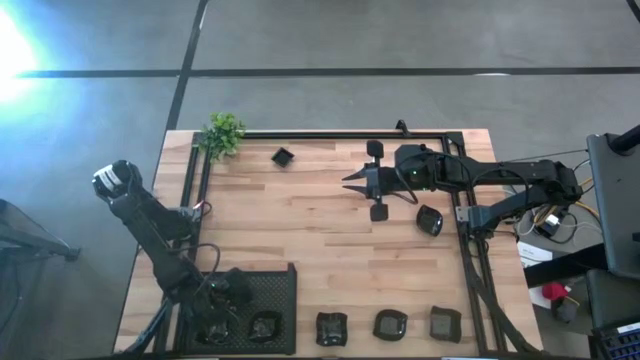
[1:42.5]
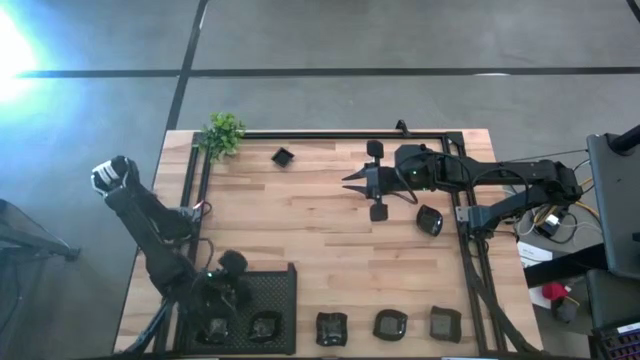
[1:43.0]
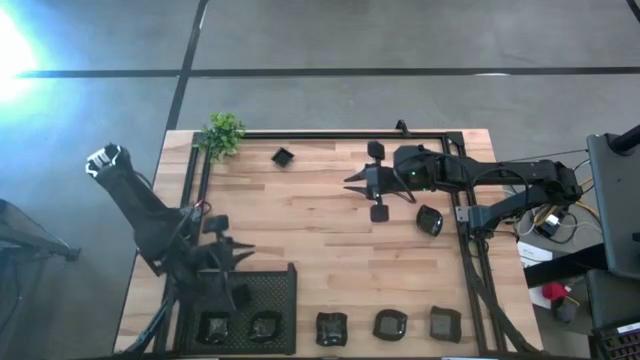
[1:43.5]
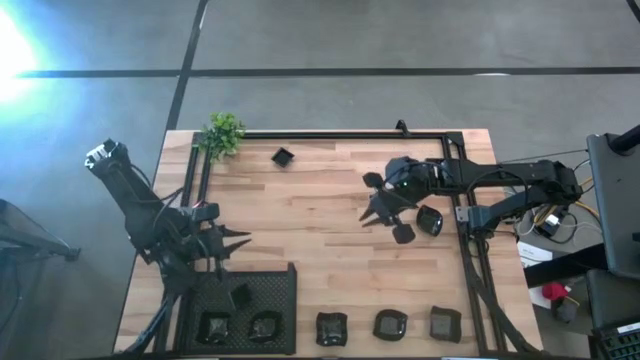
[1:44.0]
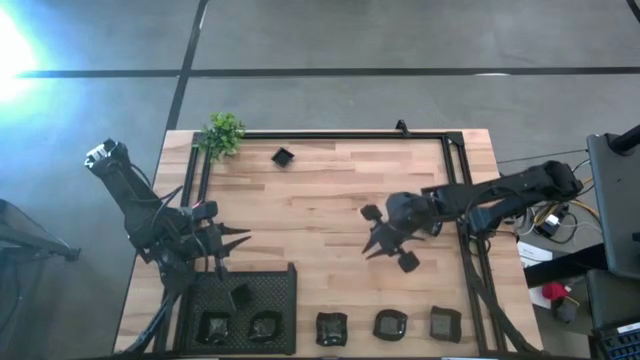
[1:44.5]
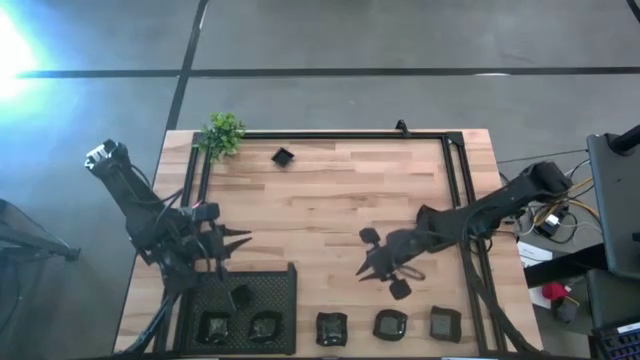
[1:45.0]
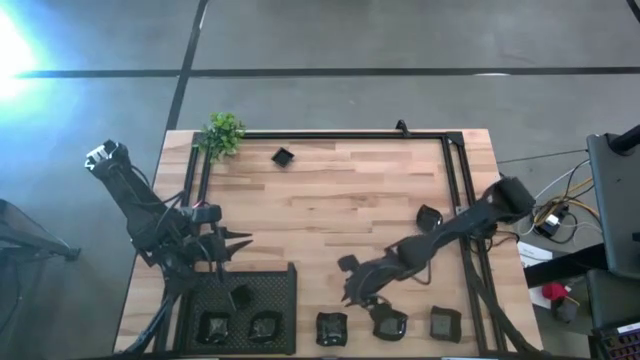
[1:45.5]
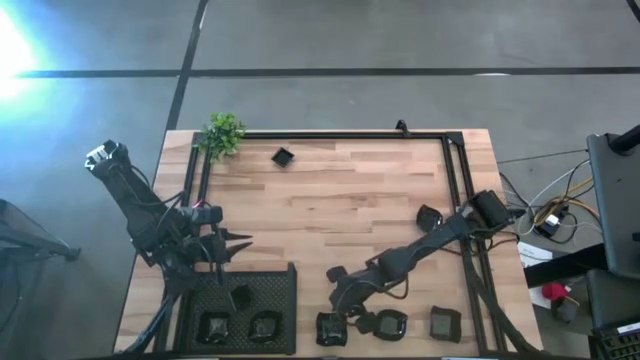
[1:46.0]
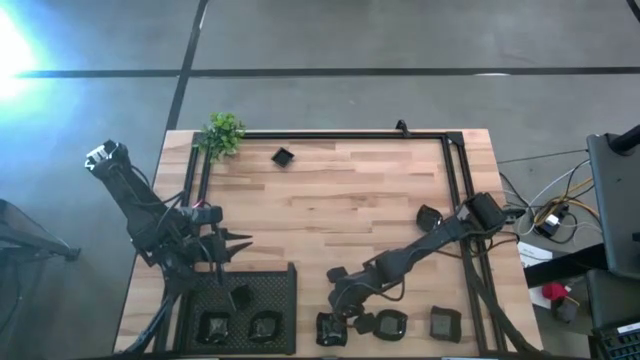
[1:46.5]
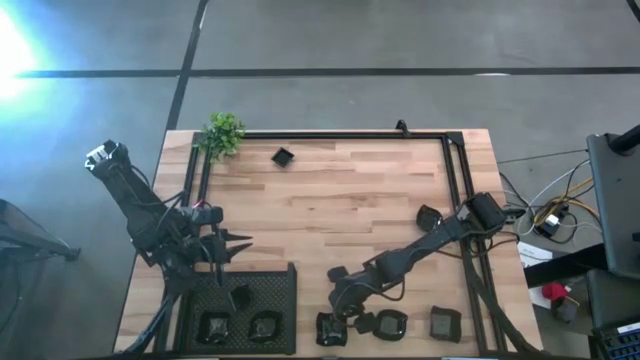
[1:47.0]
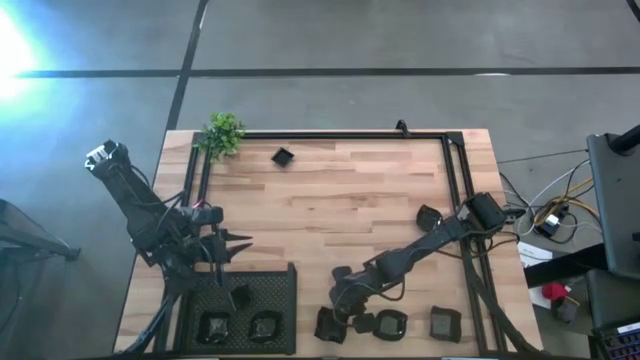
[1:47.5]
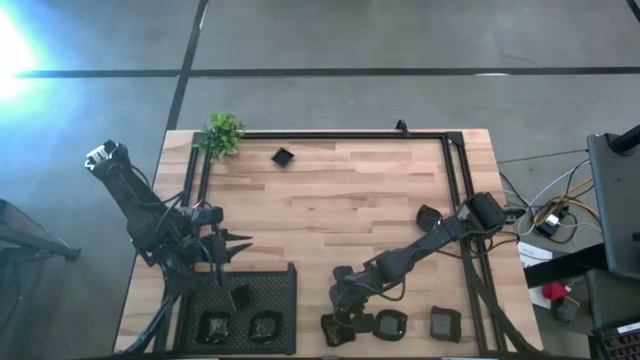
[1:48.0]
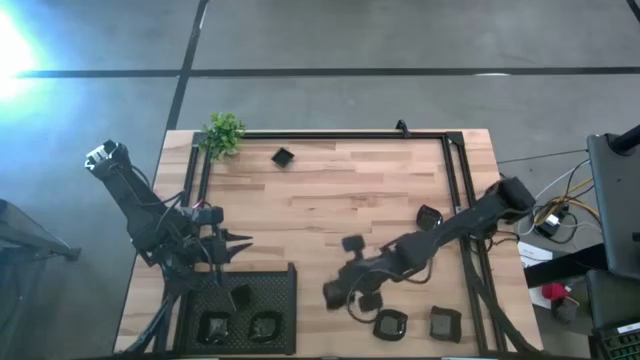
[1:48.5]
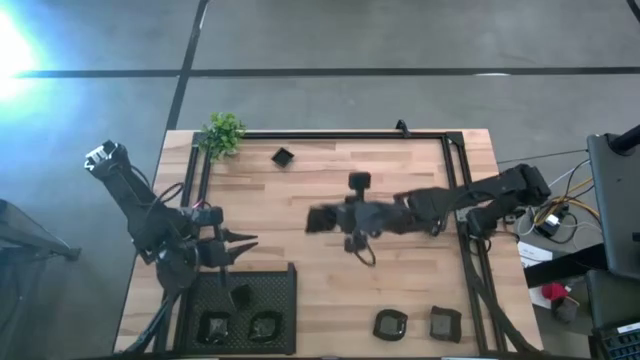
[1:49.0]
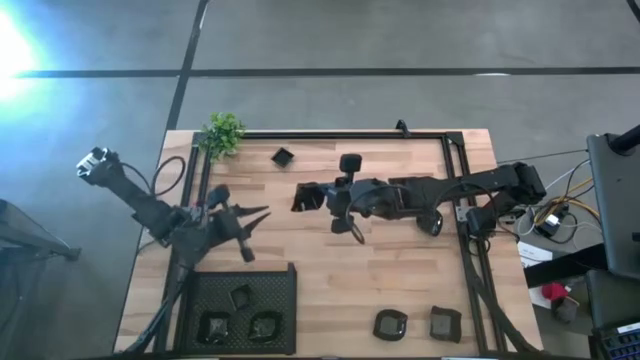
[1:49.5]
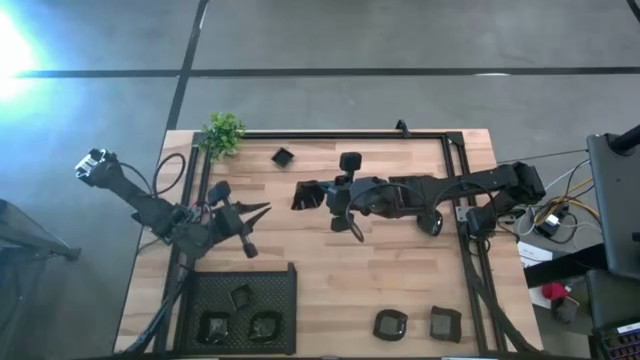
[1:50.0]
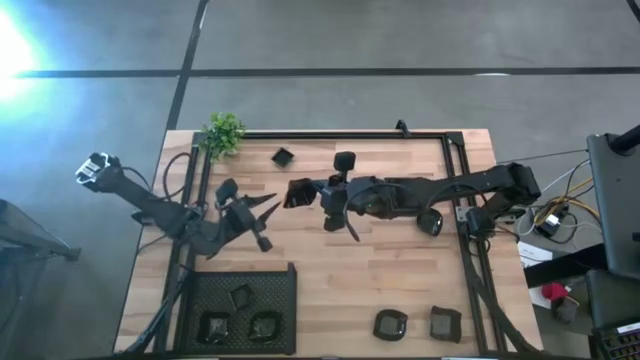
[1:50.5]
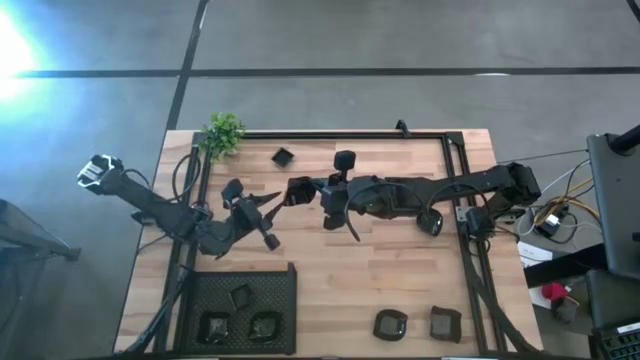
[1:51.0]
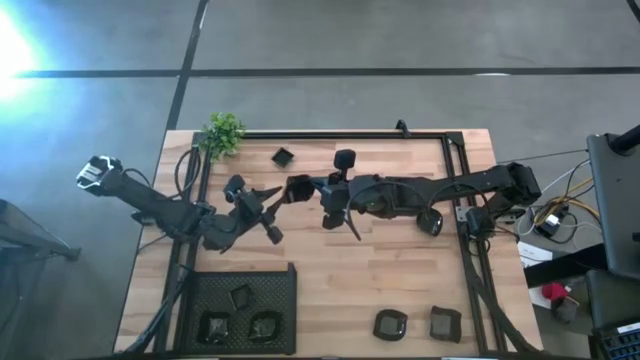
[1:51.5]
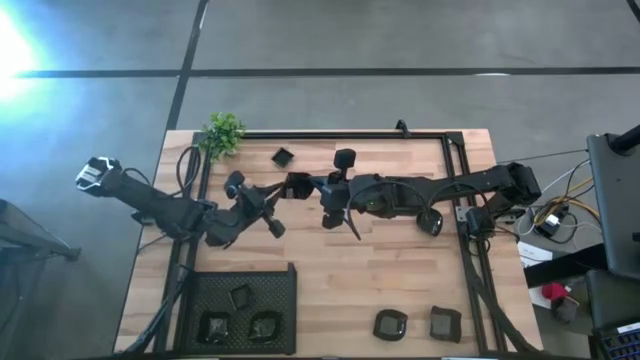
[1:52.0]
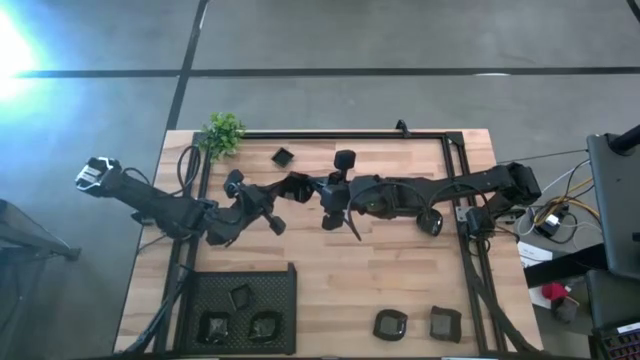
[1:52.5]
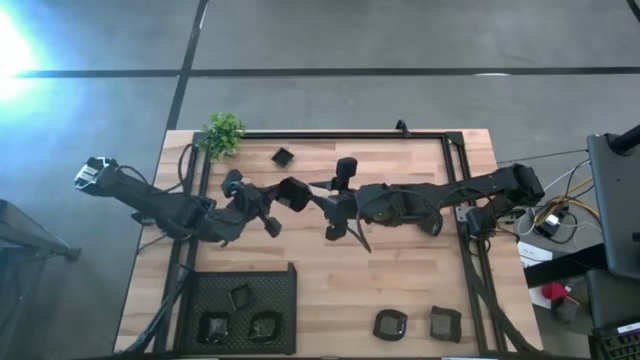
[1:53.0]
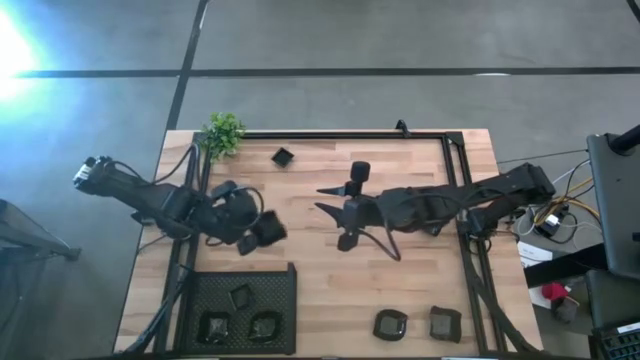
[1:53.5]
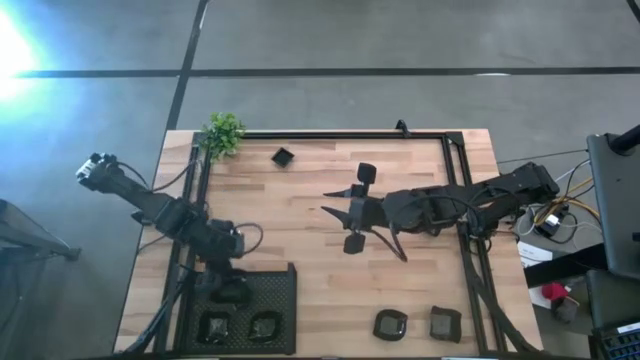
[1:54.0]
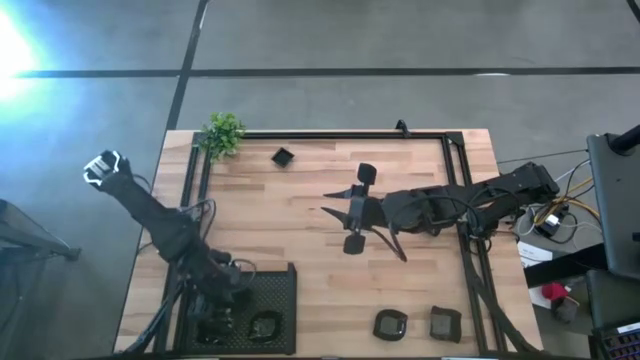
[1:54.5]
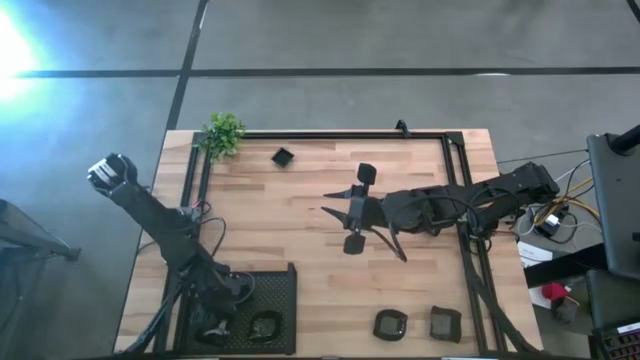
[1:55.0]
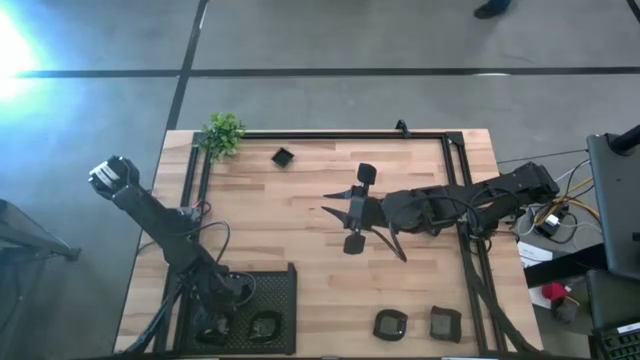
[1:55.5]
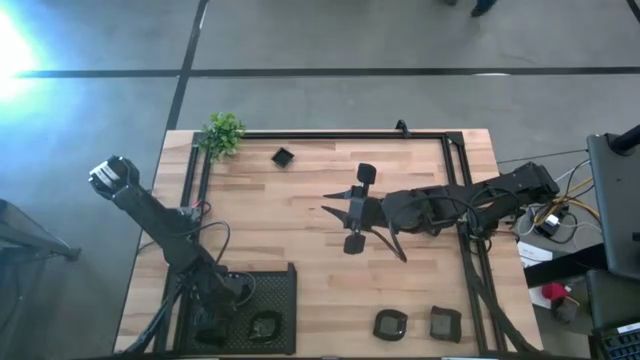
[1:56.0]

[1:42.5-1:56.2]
Task: Pick & Place Mini shaped plates
Stack the distorted square plate on top of the distorted square plate on the shelf

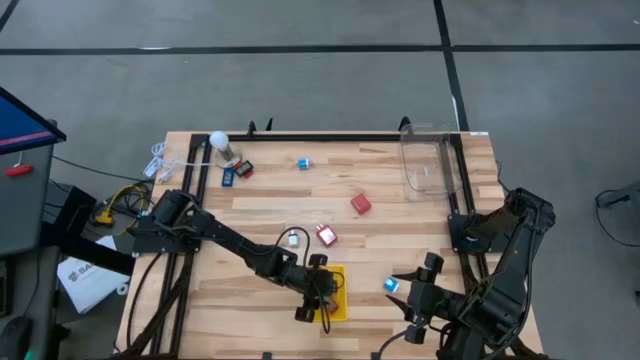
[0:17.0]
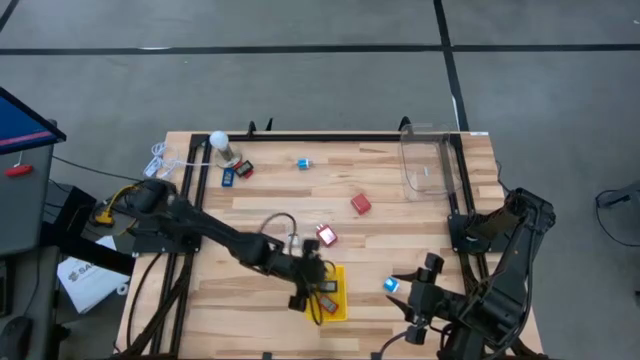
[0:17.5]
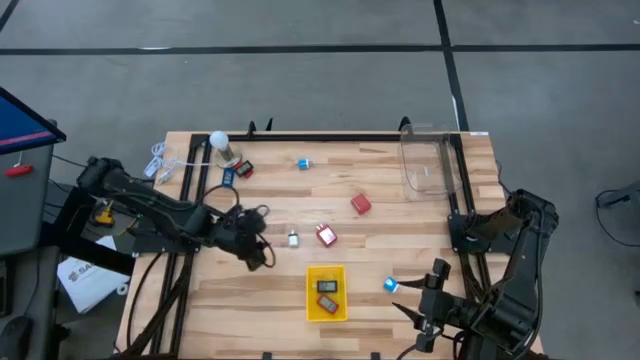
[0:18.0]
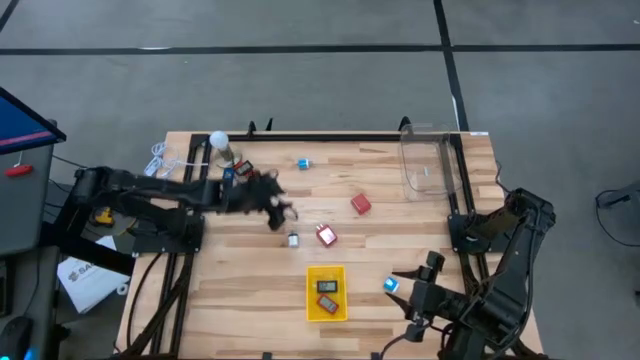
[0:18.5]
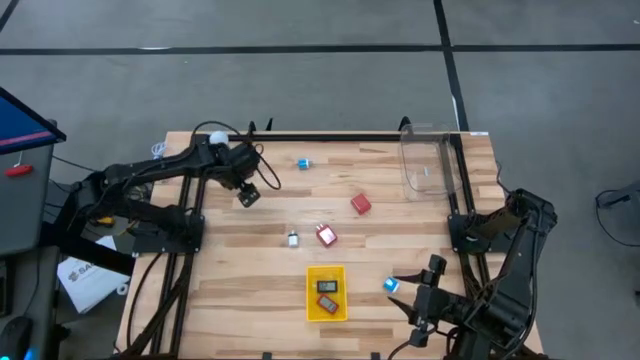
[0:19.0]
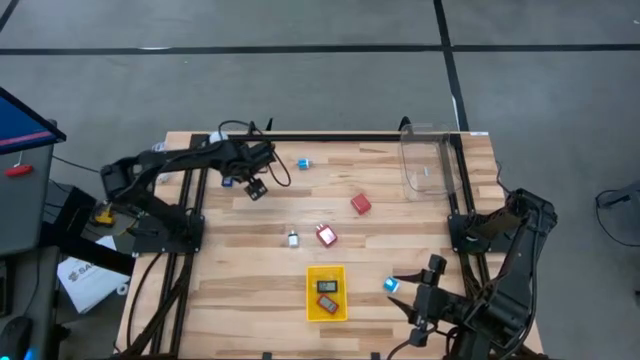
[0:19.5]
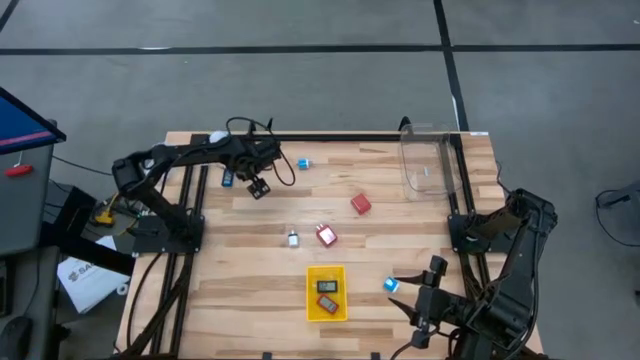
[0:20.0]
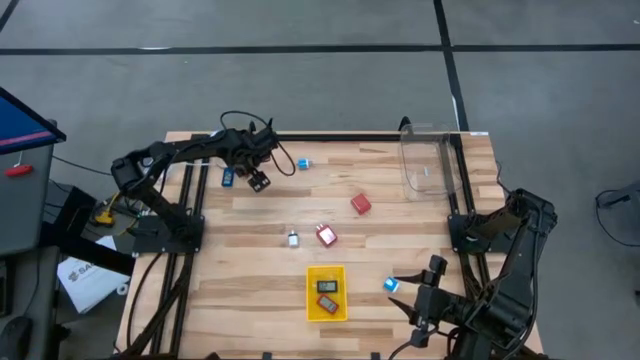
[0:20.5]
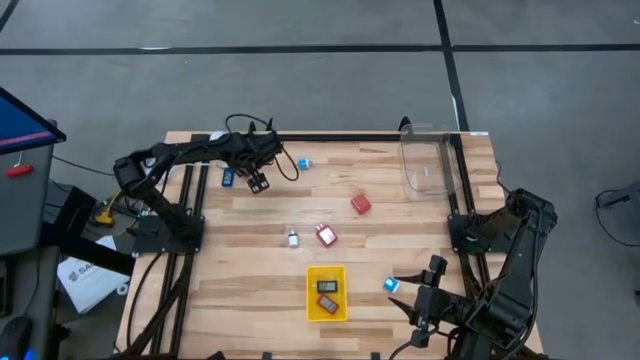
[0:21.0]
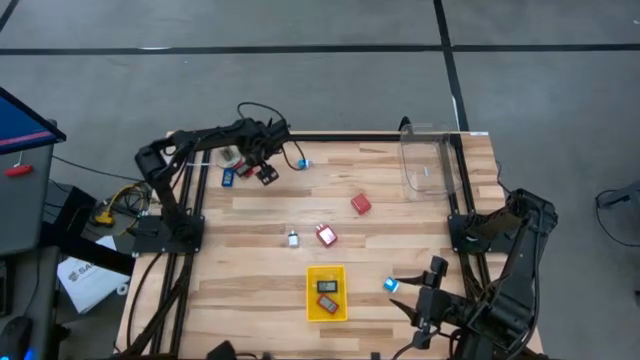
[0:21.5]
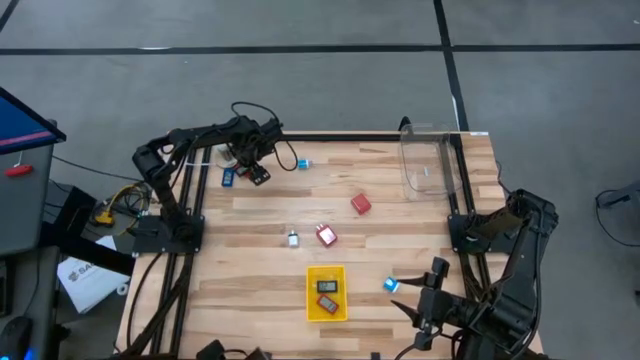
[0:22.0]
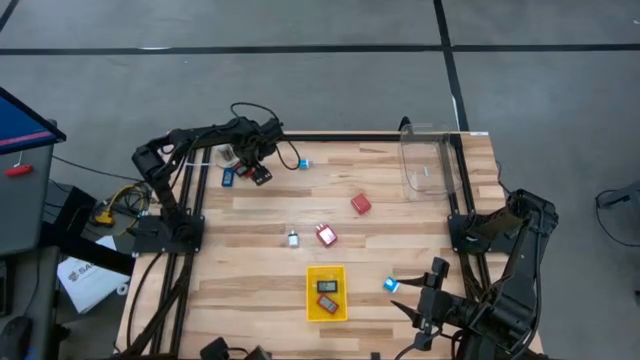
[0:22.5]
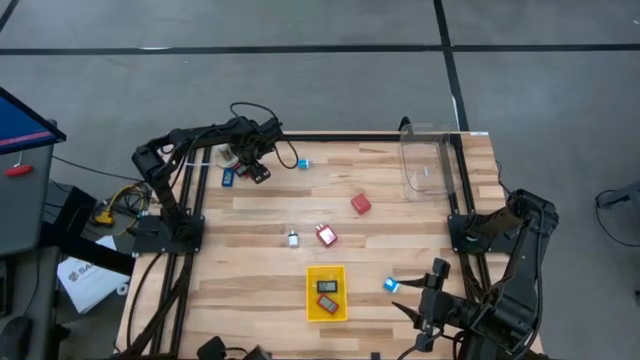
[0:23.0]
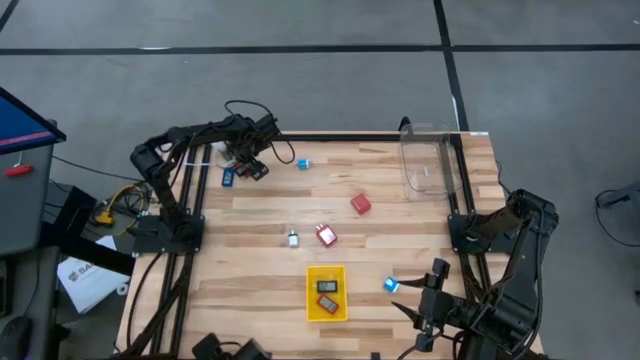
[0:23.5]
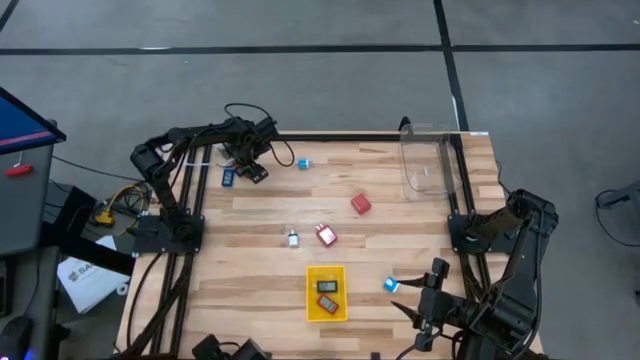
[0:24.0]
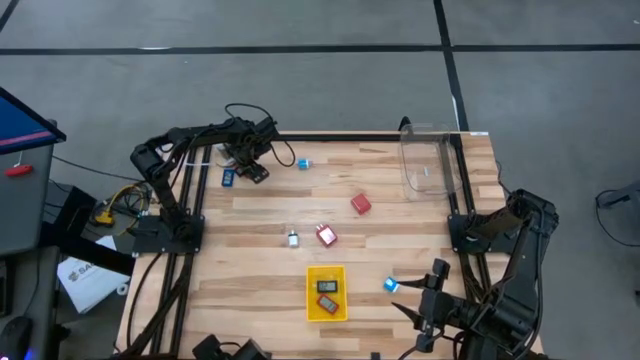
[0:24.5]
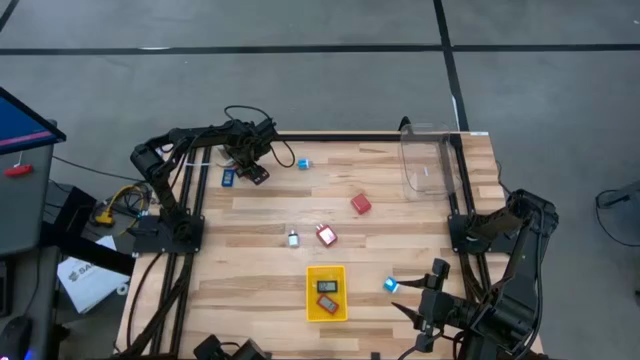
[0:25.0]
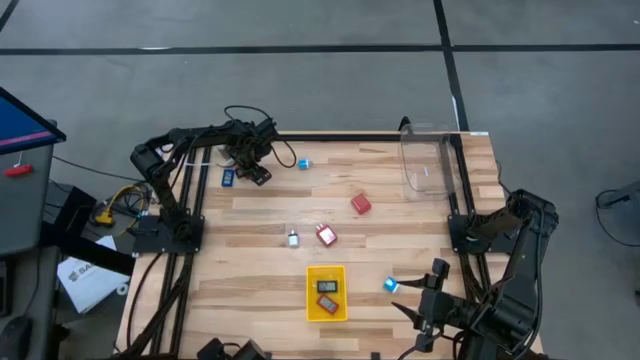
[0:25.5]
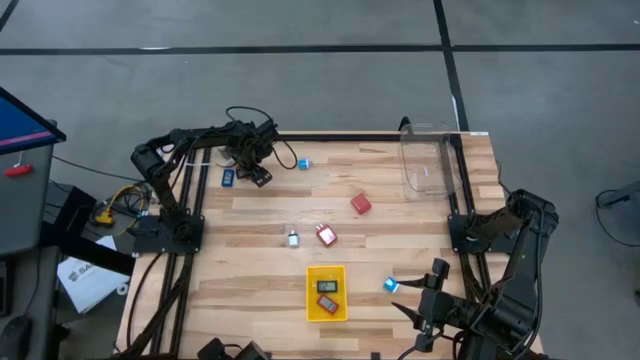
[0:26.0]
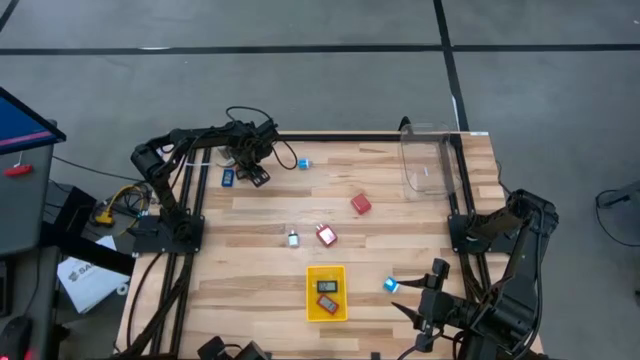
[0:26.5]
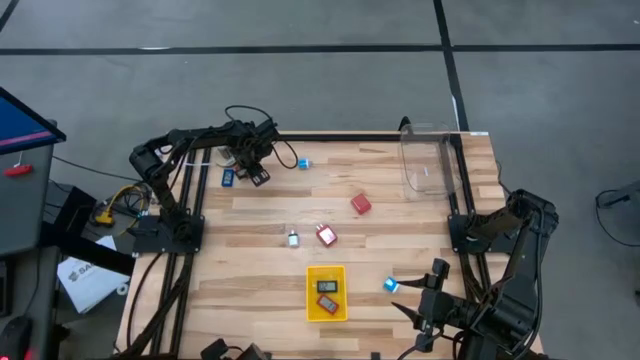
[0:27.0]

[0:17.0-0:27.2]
Task: Pick & Place Office items
Put the black digital timer into the yellow bin
